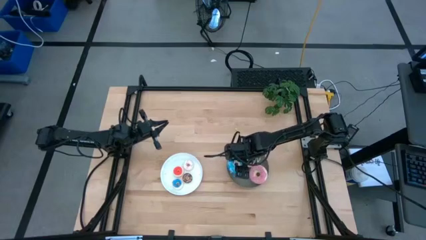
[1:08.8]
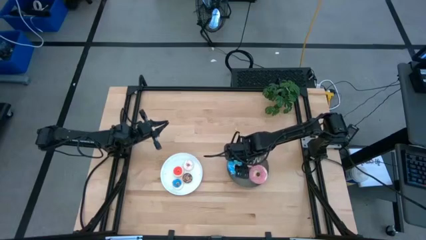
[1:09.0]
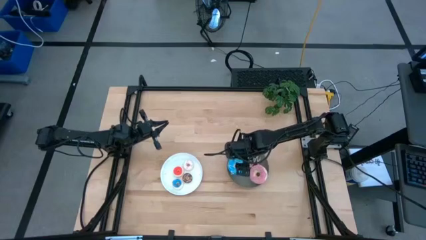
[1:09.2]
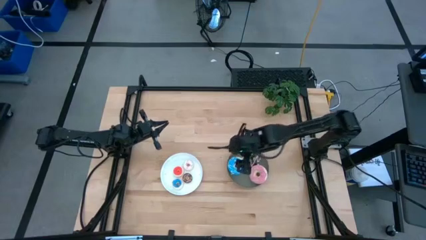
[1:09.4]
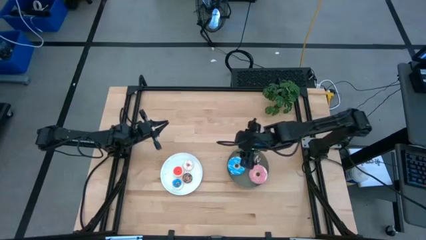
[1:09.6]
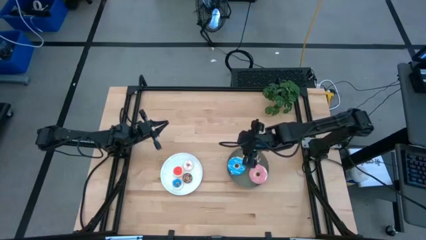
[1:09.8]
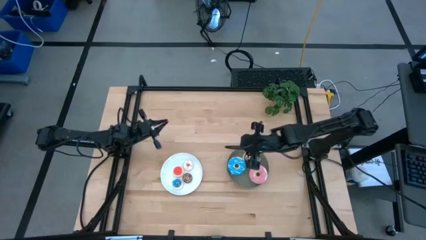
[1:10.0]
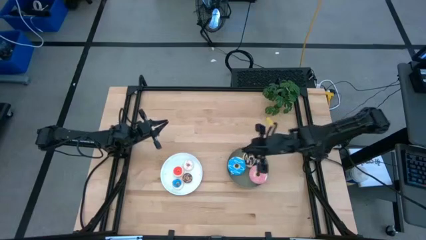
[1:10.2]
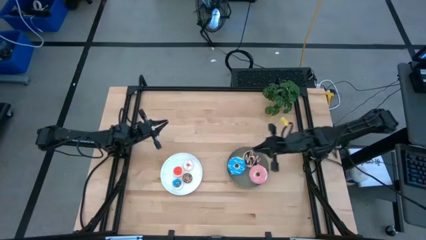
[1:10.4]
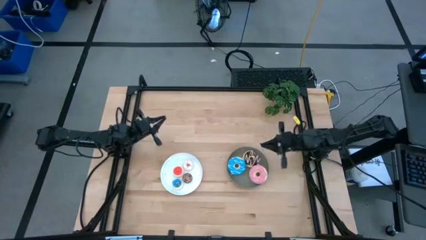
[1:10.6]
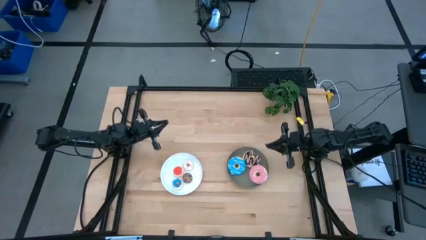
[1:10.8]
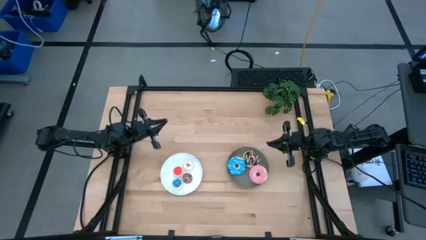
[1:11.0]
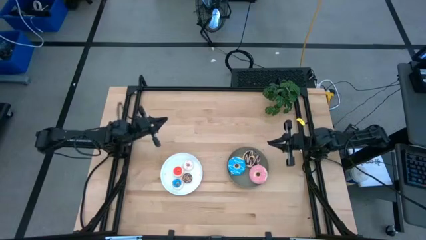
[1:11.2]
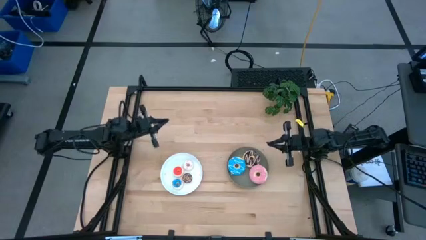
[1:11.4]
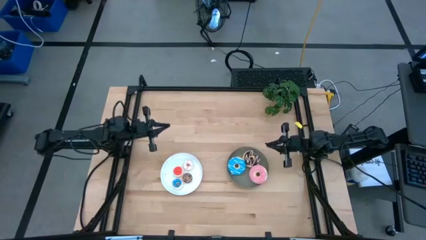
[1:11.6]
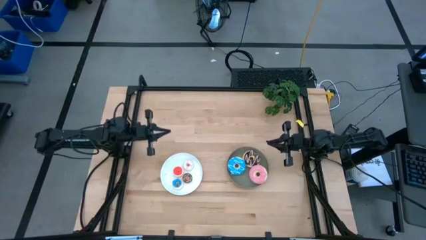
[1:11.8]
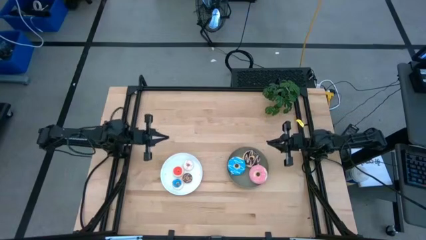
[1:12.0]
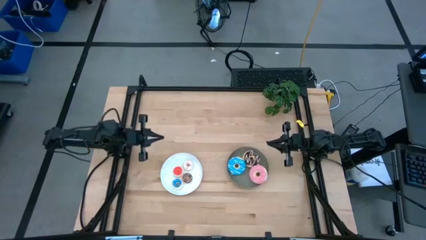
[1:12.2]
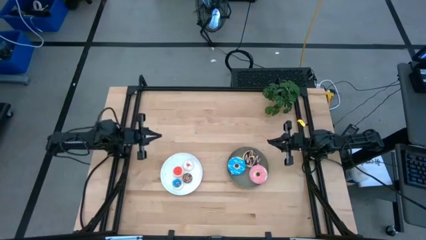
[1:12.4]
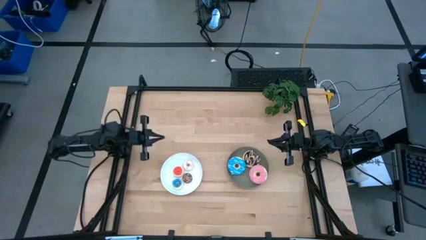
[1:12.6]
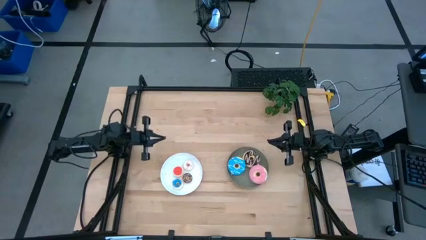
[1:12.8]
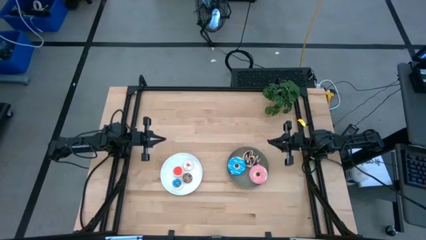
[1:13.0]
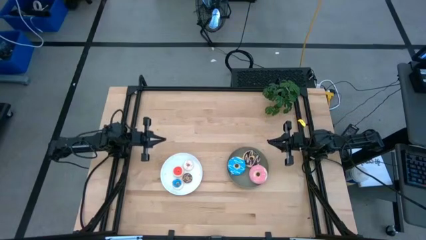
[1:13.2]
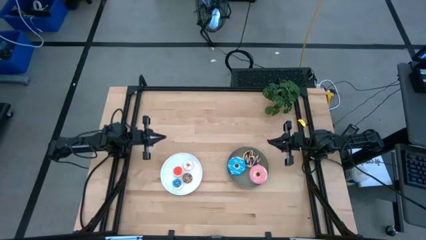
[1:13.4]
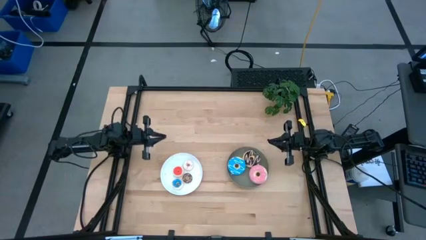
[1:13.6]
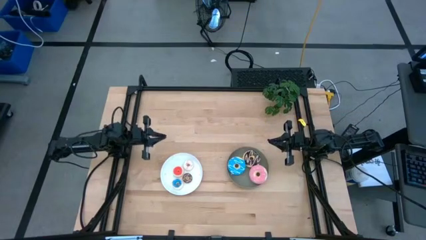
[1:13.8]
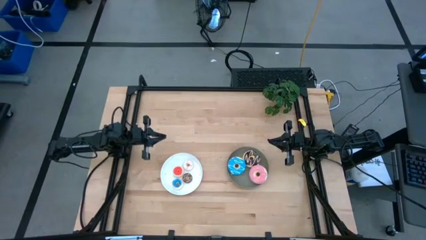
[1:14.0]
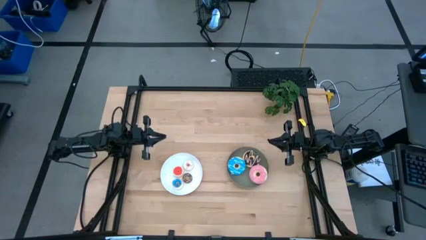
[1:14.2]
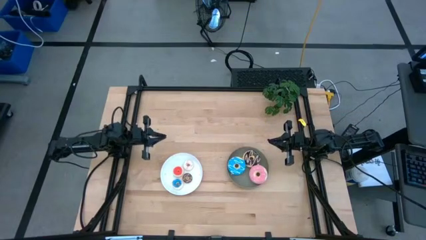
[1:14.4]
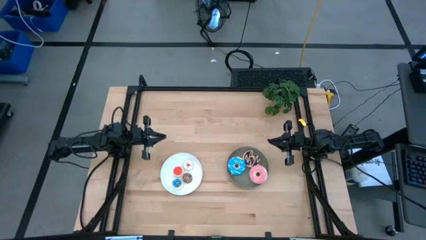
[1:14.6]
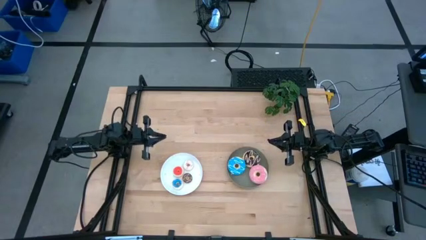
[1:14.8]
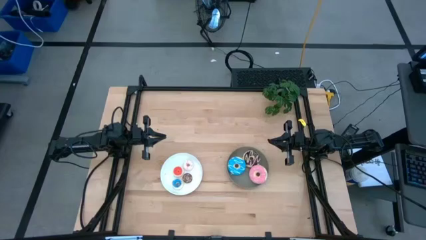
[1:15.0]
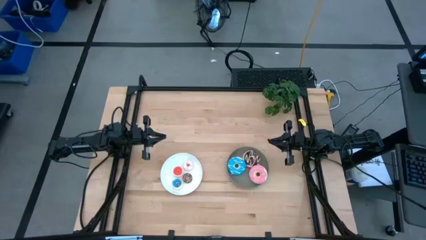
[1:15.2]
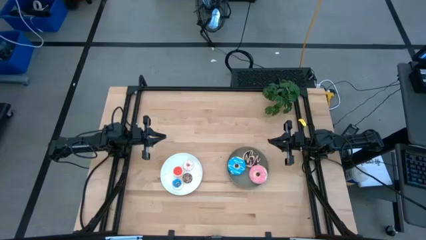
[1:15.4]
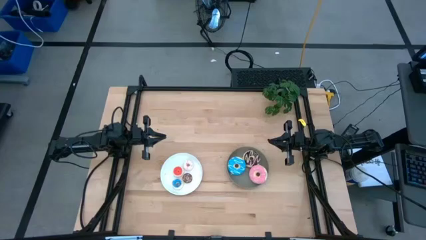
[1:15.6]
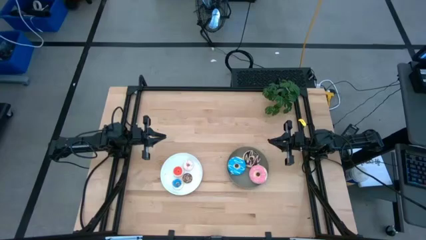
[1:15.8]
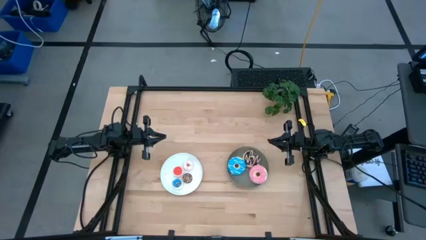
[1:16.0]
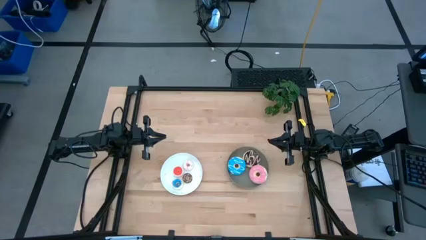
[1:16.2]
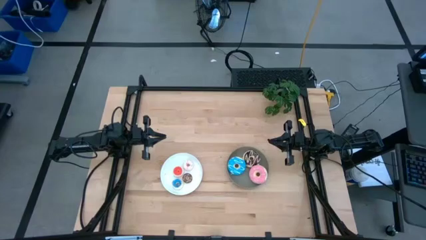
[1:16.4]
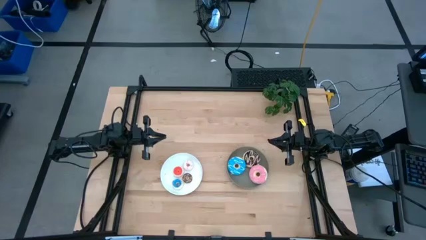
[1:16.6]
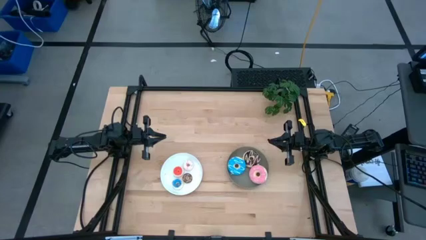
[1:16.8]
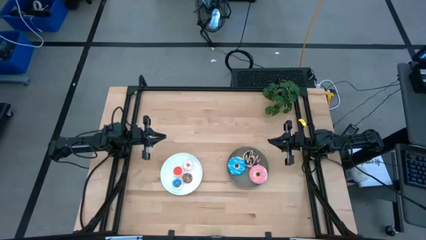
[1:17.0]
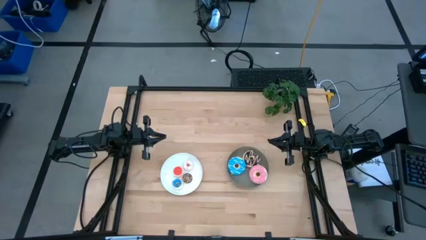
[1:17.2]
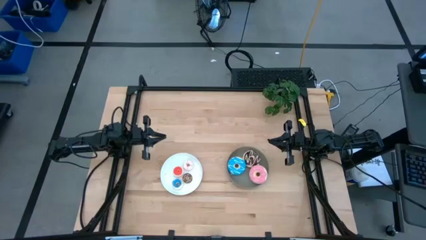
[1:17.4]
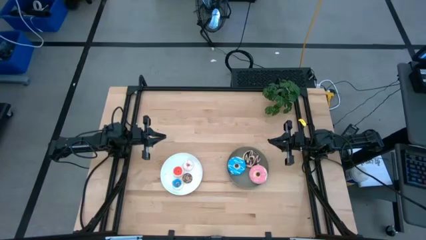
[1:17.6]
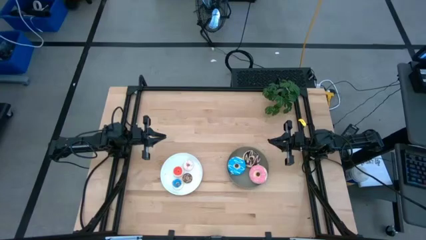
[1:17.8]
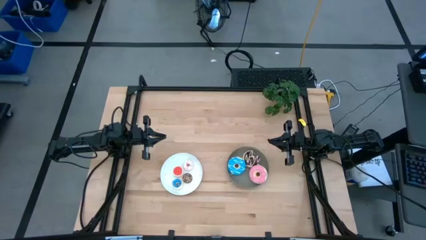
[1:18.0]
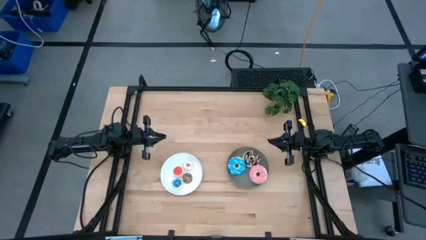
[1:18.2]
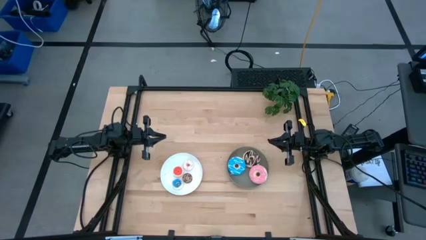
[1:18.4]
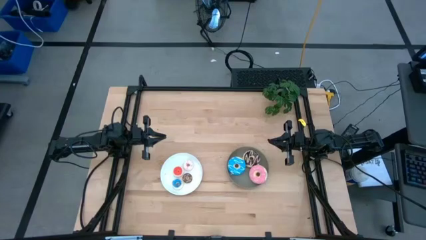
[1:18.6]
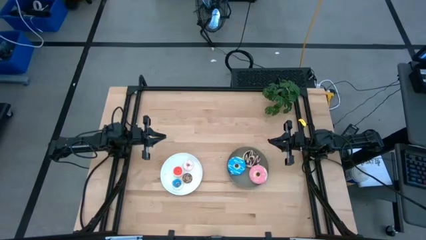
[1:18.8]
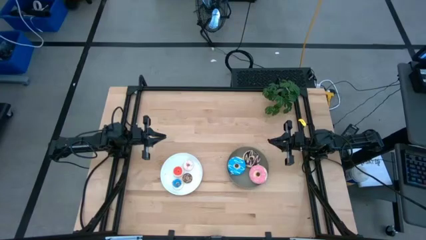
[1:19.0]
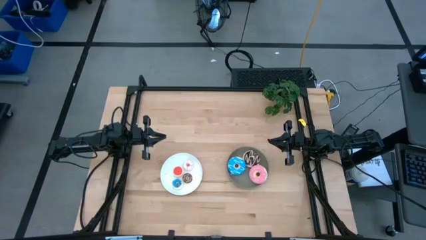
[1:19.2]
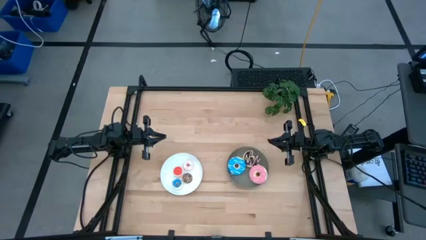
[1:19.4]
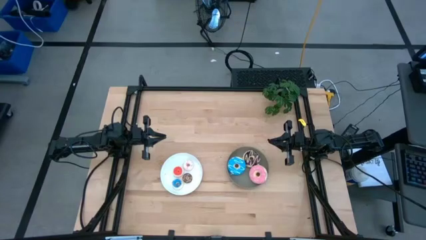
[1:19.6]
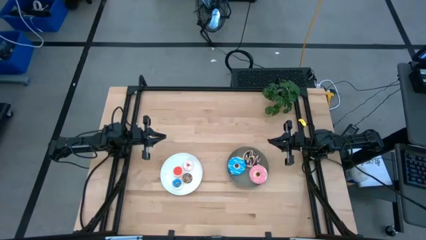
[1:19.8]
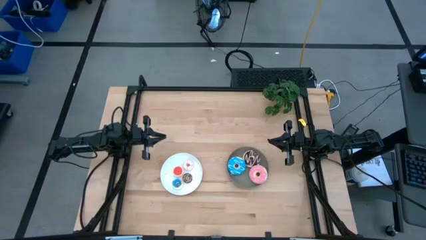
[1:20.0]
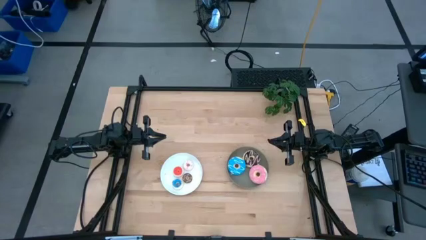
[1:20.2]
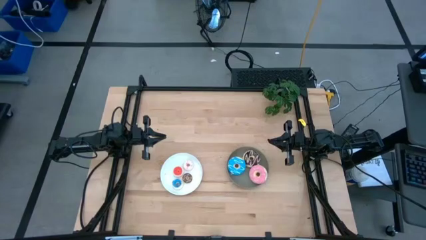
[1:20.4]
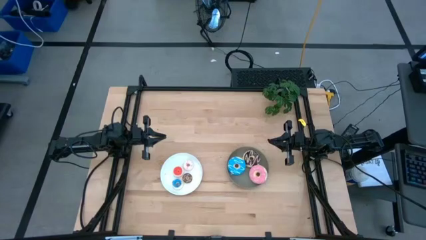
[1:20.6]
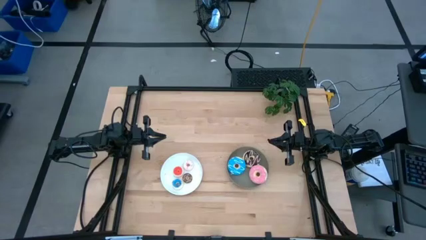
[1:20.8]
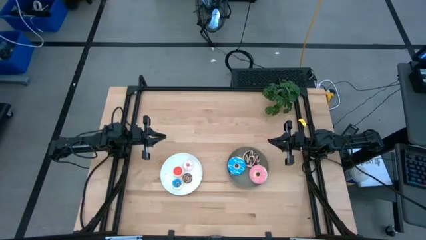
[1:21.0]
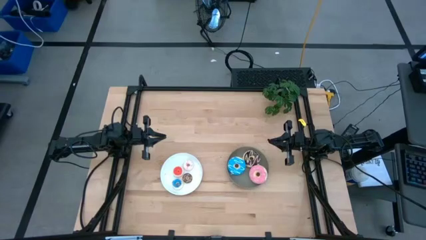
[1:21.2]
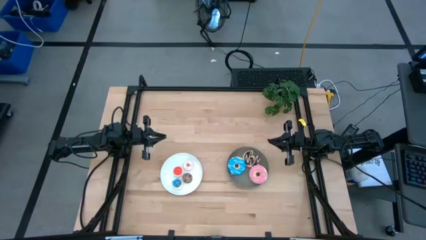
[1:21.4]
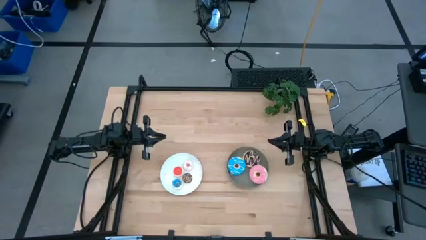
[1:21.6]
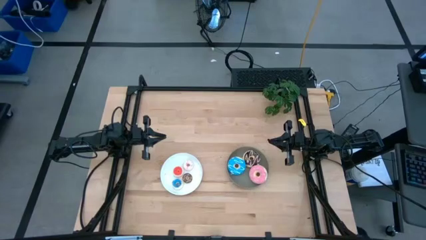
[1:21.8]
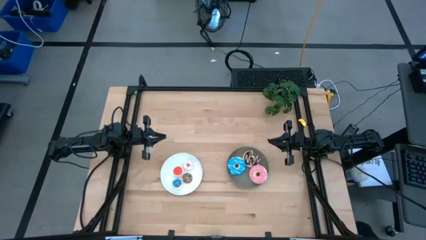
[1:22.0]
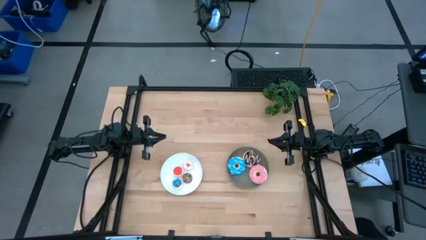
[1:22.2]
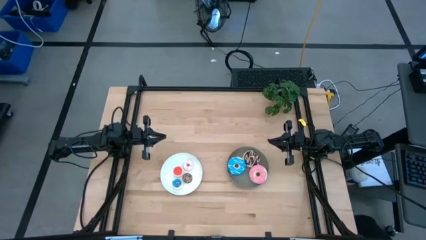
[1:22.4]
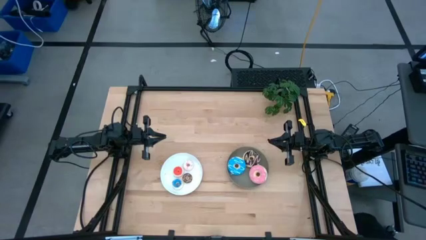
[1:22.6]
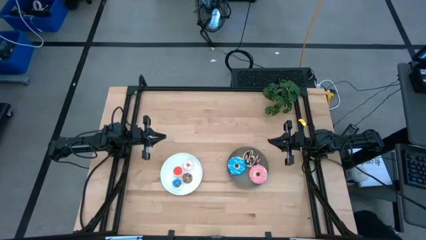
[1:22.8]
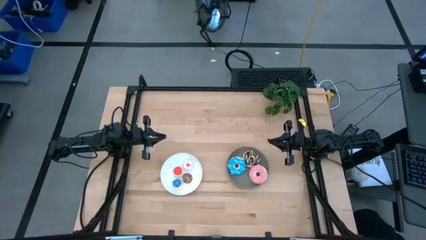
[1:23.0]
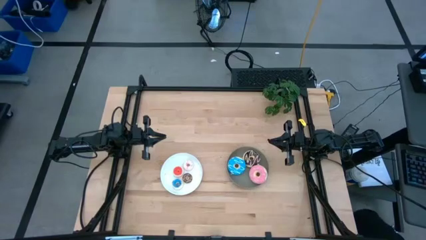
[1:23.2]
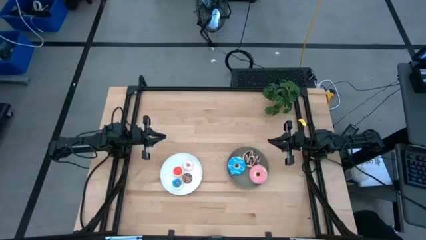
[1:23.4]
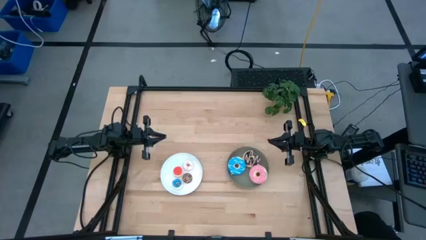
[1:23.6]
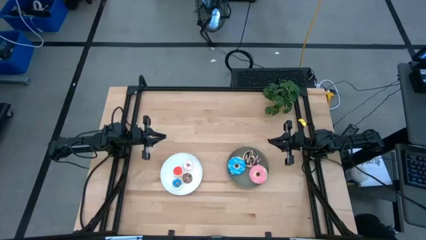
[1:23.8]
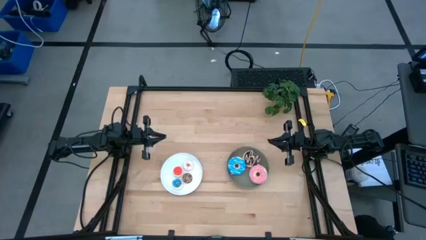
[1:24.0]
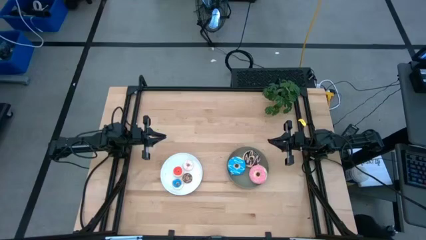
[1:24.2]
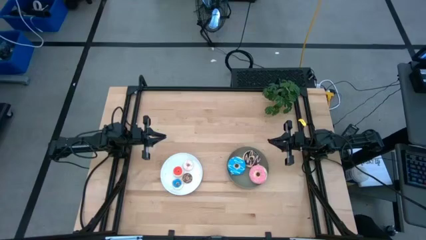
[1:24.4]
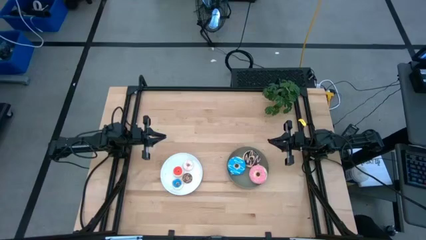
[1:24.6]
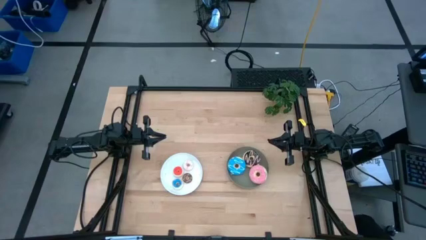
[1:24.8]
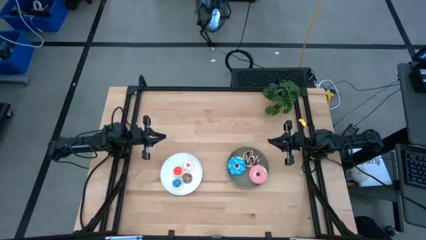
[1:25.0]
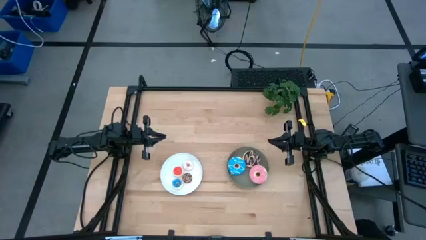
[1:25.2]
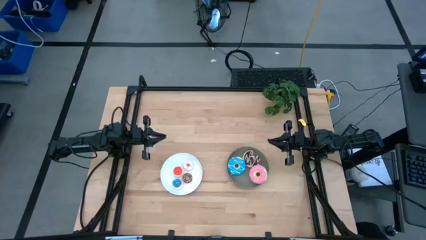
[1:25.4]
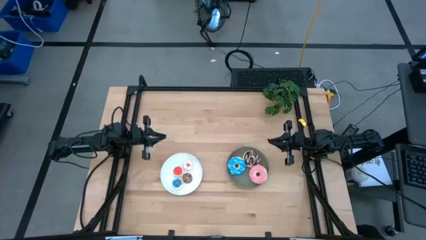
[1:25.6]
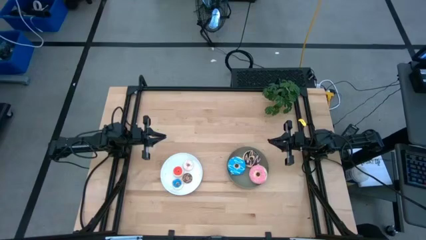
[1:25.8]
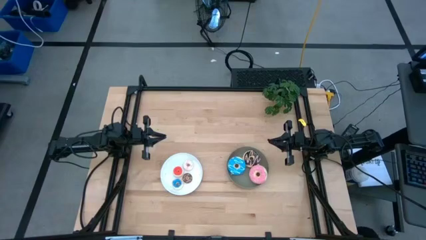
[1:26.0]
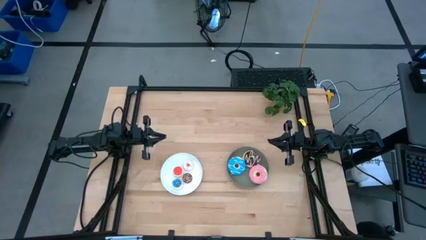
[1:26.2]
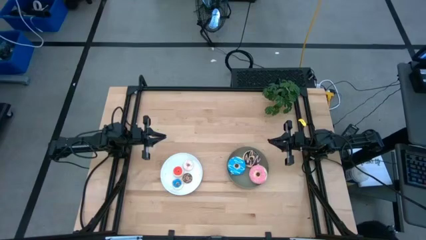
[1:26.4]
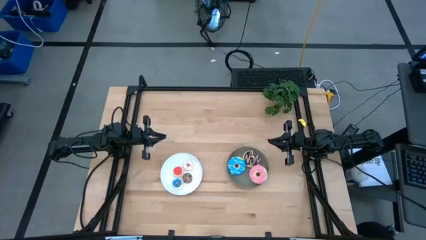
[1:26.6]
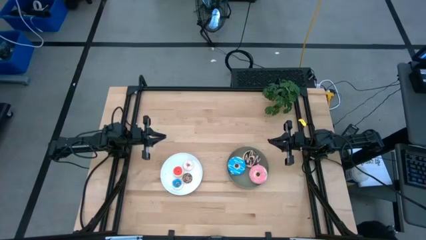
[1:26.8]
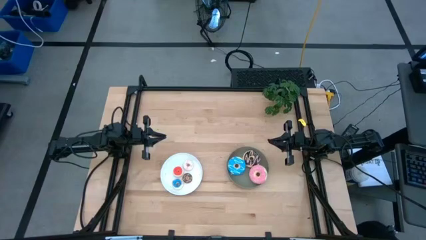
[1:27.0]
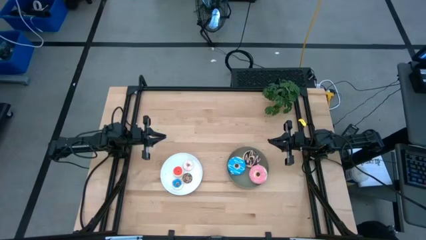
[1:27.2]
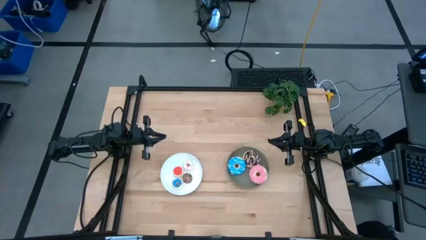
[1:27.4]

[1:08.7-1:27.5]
Task: Pick & Place donuts
Return to Home Position
